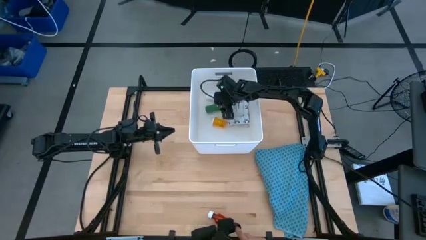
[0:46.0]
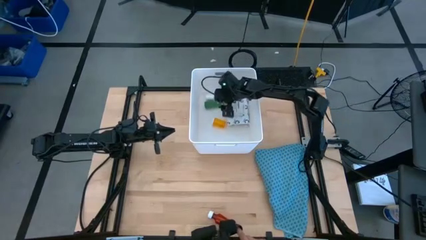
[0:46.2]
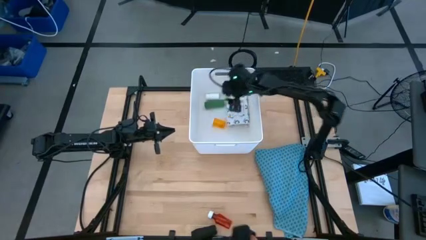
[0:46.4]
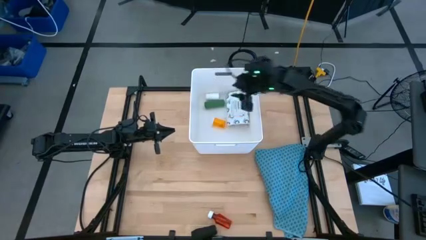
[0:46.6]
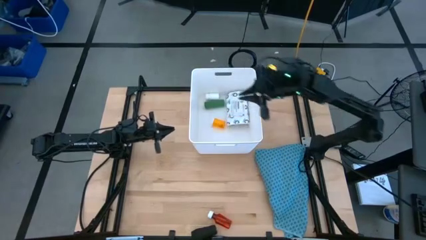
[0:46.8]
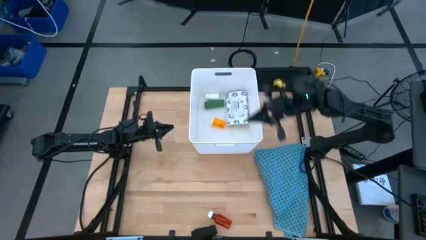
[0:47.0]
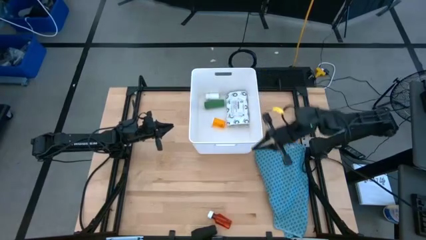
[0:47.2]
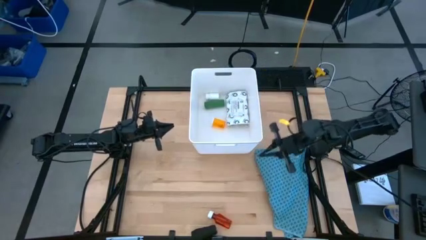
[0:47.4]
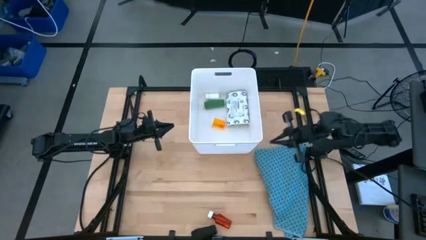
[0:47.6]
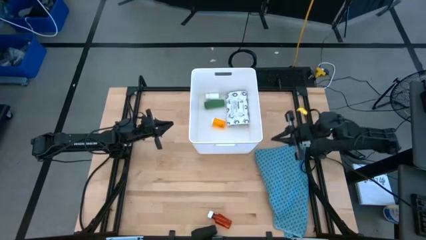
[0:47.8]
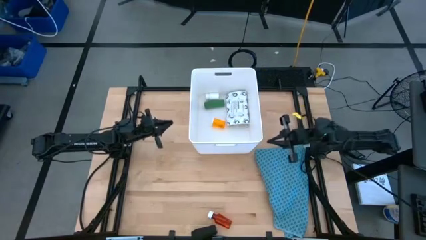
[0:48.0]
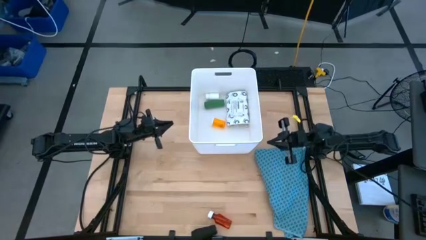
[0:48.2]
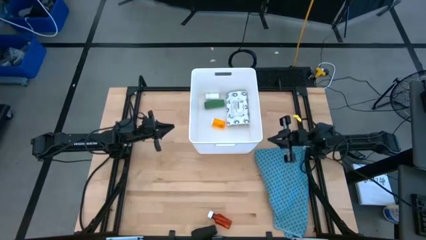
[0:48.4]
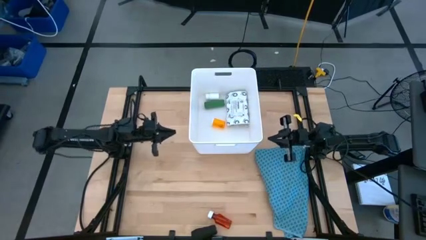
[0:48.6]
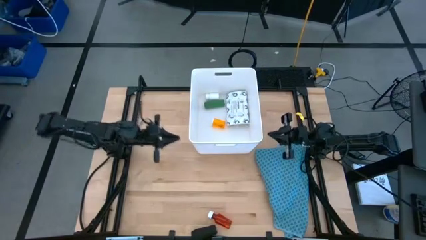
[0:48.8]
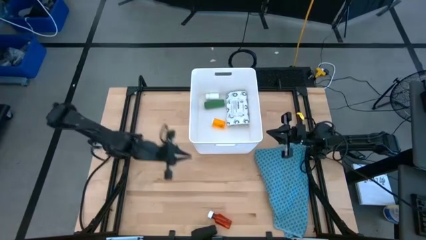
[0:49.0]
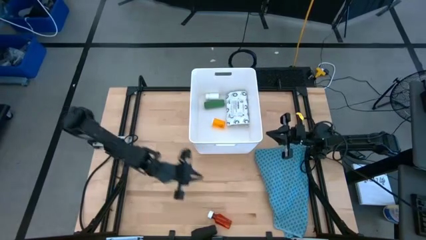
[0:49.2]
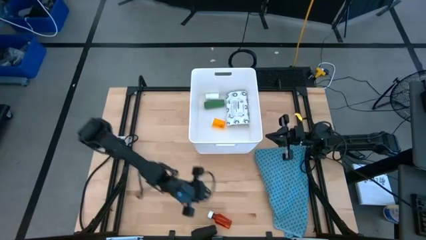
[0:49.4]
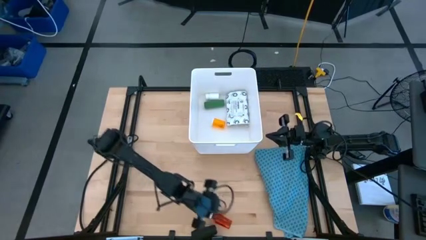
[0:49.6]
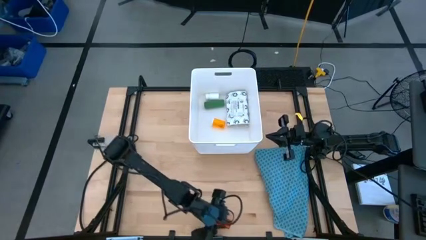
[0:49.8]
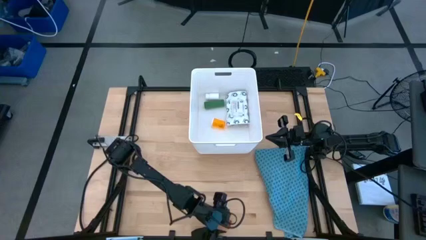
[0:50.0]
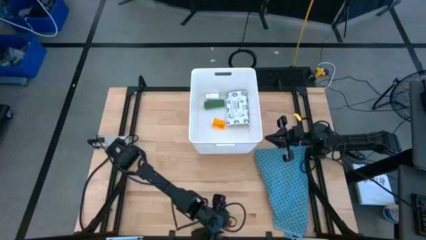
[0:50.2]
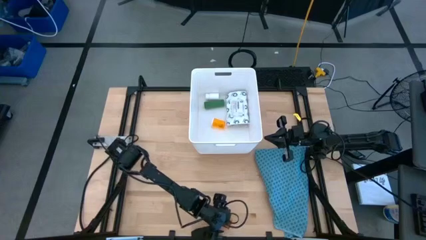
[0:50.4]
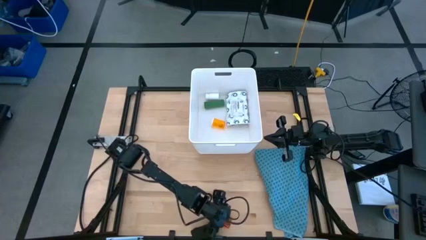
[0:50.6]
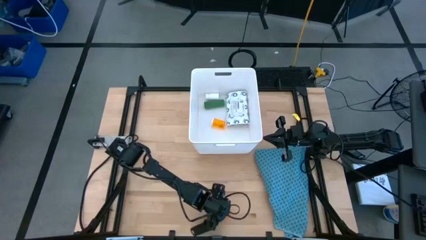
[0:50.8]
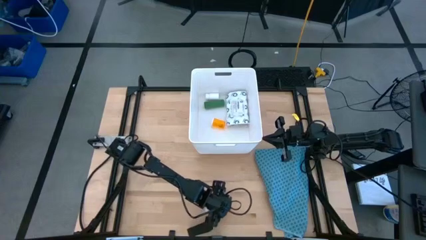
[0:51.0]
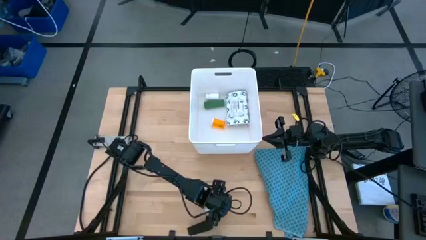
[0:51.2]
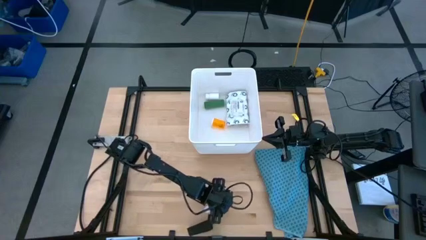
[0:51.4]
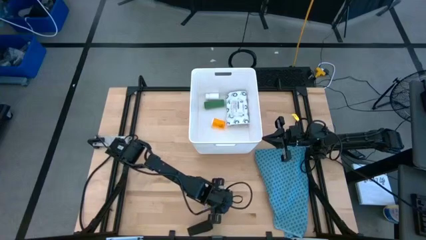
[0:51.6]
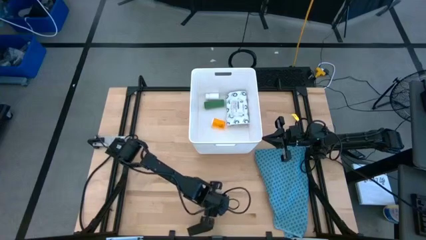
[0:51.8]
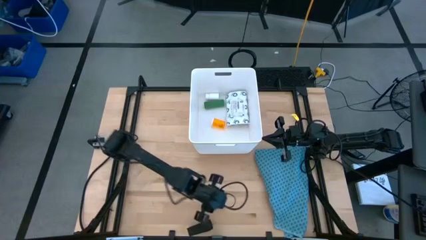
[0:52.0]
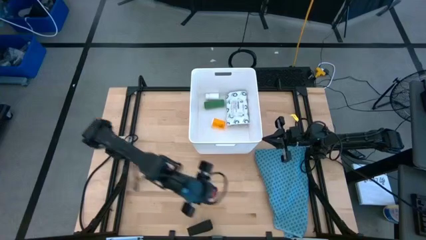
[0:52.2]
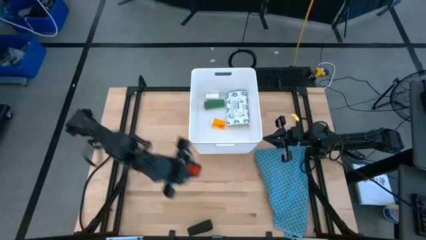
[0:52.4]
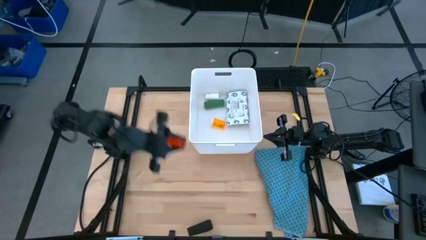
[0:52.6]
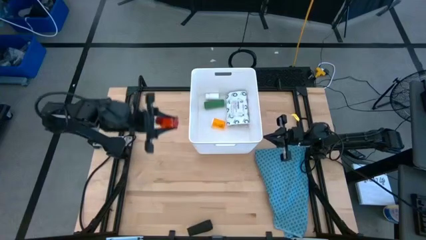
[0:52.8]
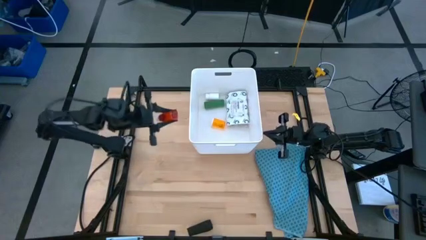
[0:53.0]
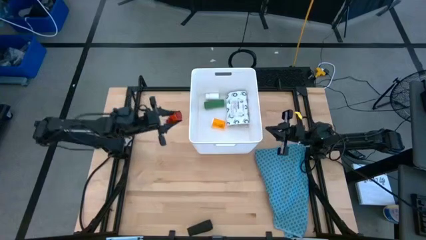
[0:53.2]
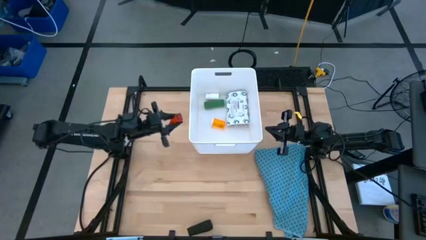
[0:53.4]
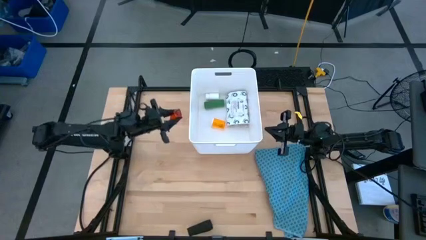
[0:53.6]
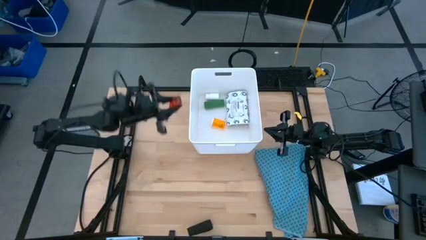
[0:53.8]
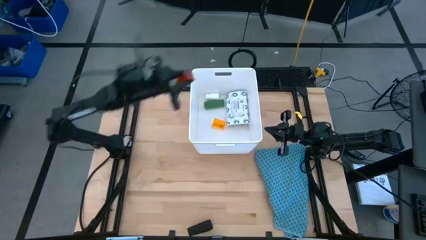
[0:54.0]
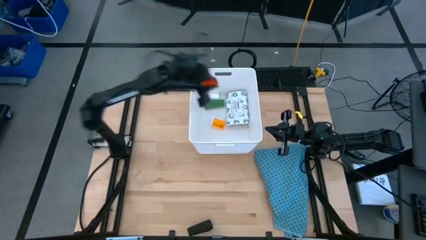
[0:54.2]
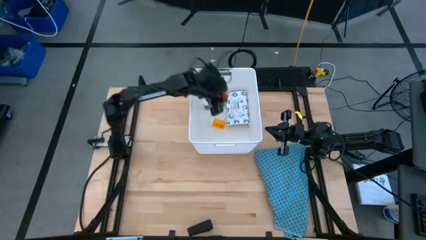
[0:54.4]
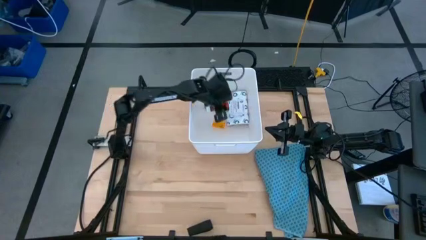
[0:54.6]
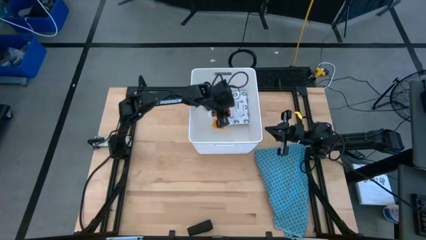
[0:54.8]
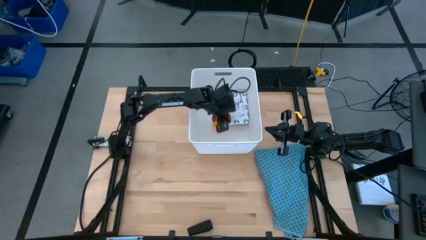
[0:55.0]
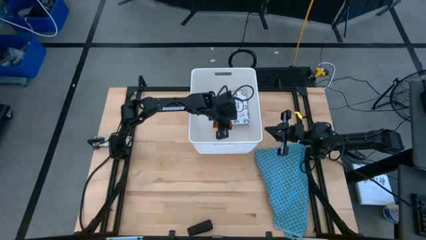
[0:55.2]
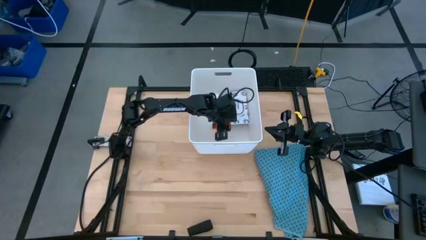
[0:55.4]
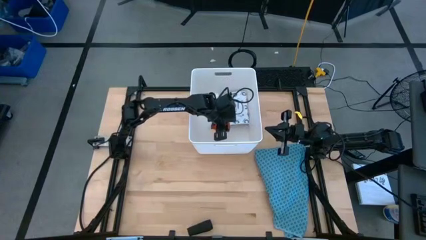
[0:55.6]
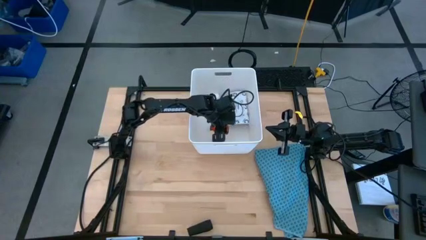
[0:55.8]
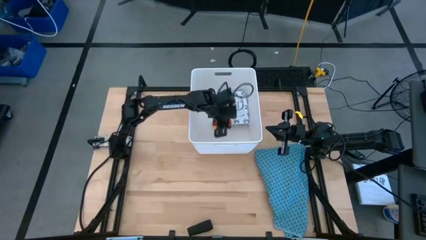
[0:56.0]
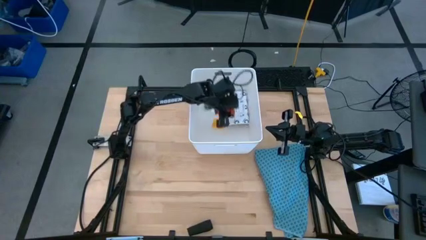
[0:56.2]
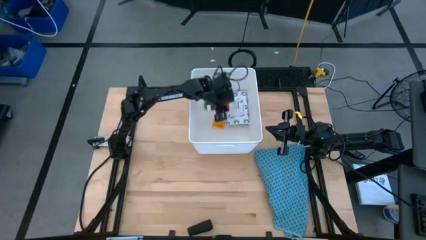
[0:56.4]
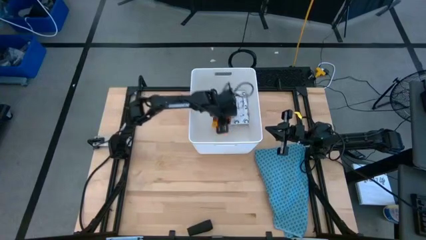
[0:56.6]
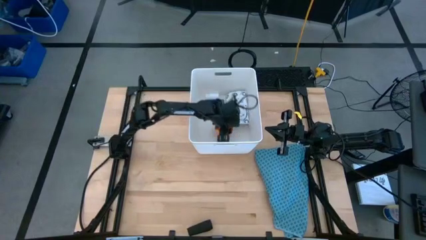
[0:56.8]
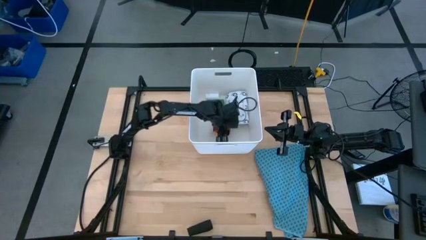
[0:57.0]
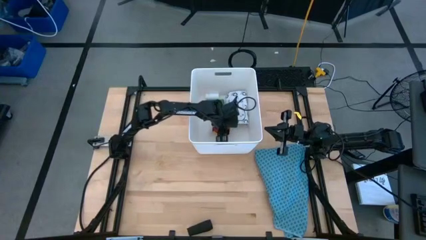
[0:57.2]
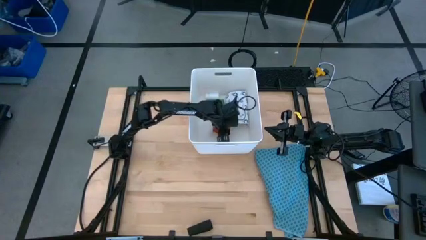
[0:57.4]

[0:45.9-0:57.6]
Task: Pick & place medical supplies in basket/bin
Put the red pill bottle into the white bin

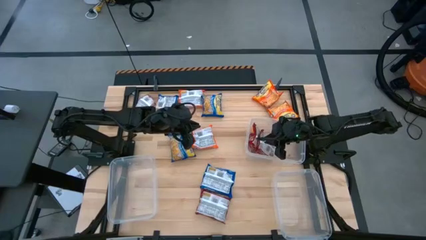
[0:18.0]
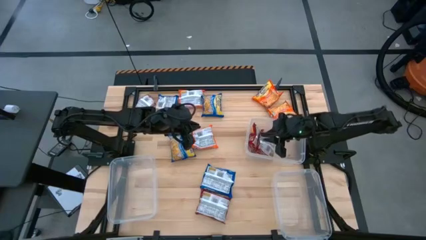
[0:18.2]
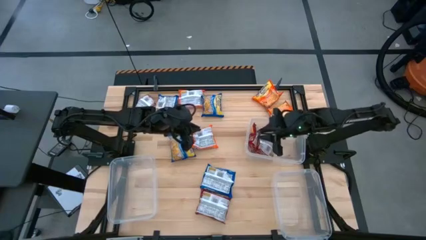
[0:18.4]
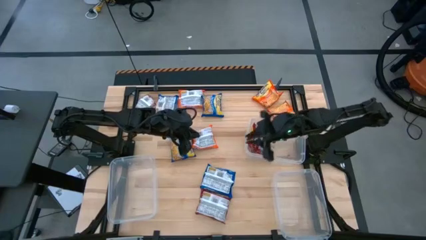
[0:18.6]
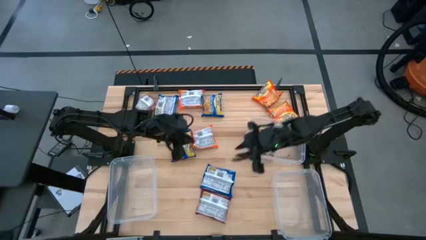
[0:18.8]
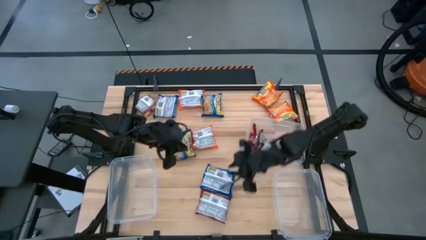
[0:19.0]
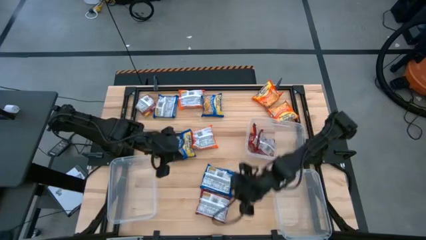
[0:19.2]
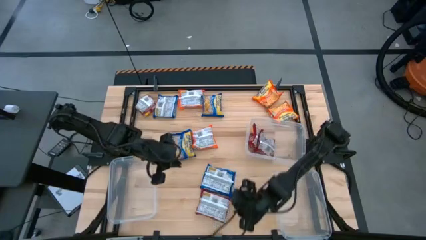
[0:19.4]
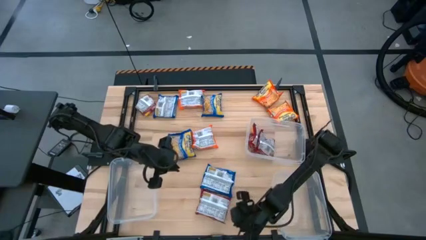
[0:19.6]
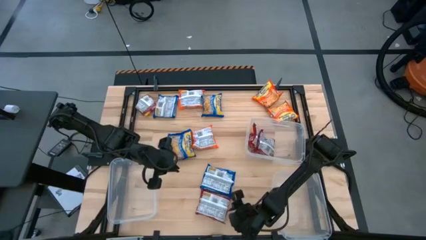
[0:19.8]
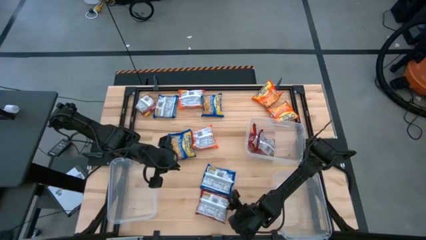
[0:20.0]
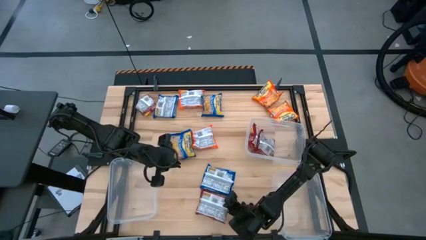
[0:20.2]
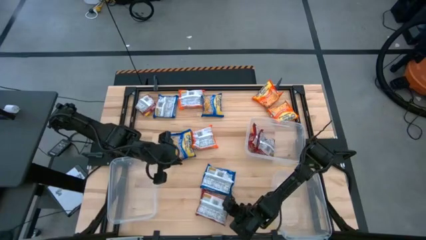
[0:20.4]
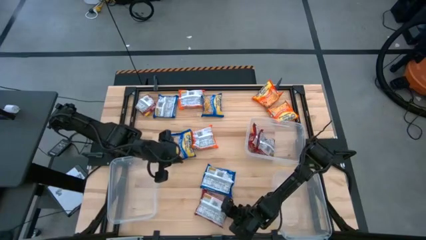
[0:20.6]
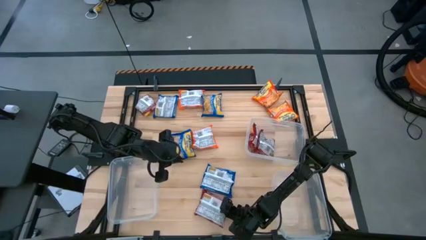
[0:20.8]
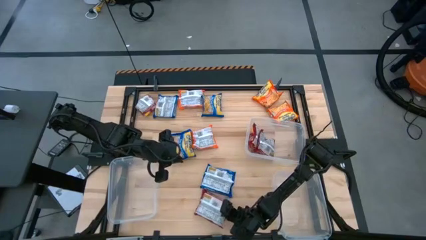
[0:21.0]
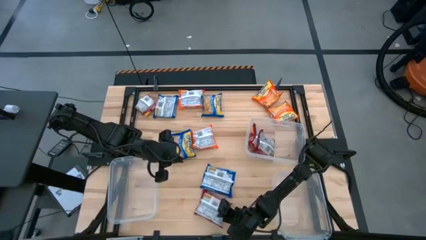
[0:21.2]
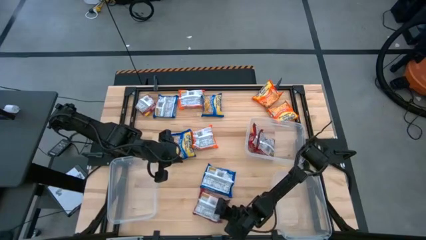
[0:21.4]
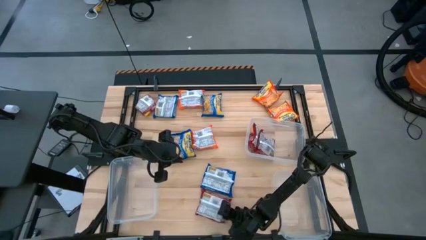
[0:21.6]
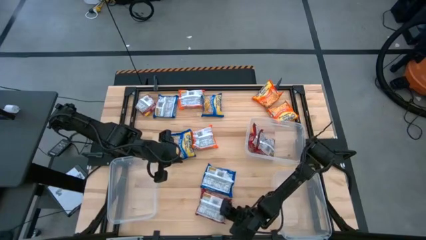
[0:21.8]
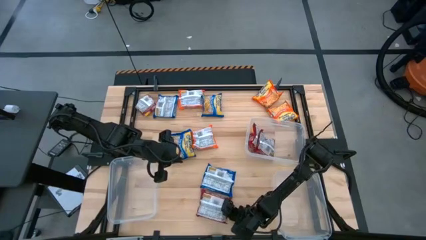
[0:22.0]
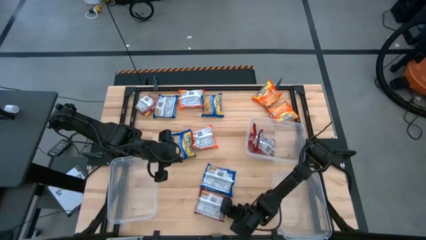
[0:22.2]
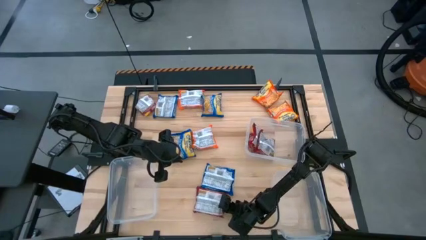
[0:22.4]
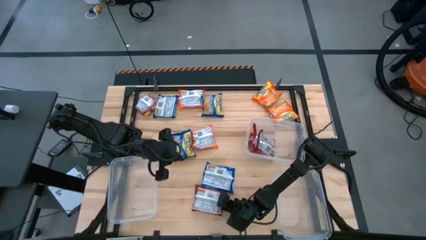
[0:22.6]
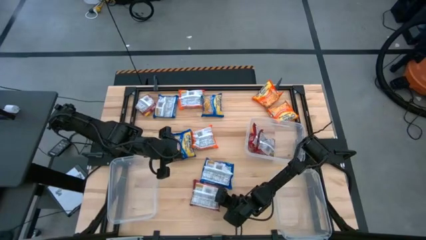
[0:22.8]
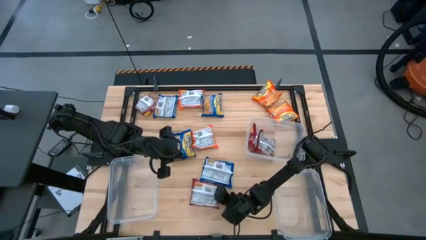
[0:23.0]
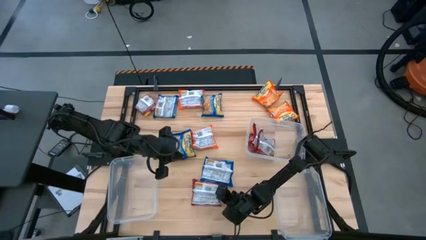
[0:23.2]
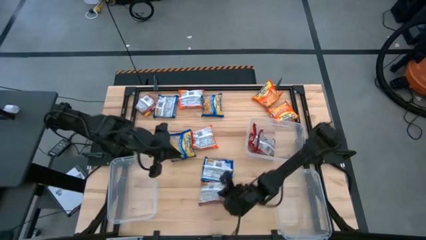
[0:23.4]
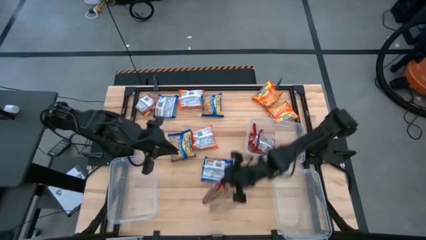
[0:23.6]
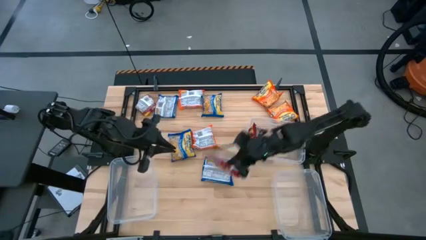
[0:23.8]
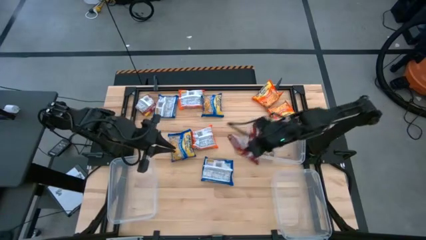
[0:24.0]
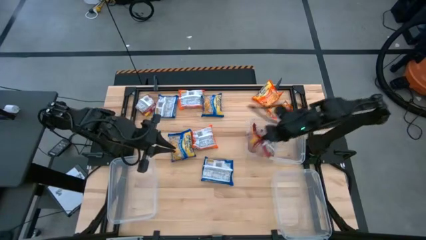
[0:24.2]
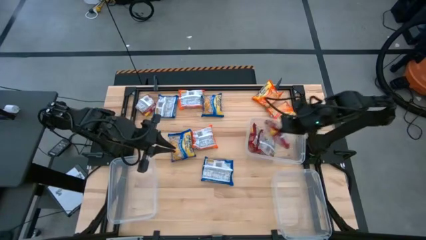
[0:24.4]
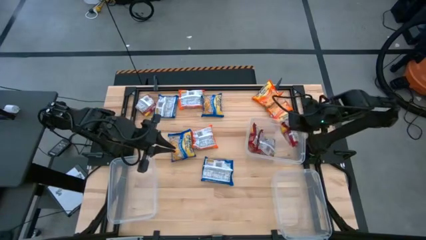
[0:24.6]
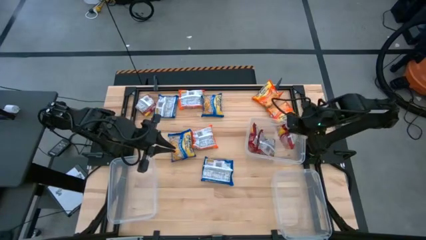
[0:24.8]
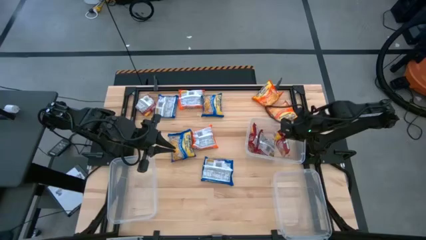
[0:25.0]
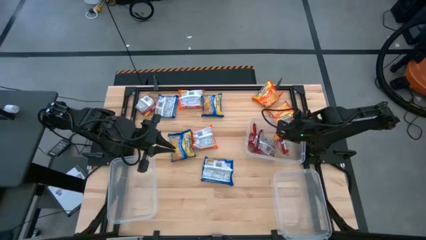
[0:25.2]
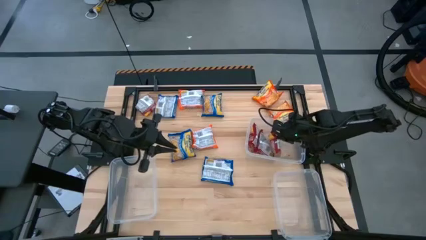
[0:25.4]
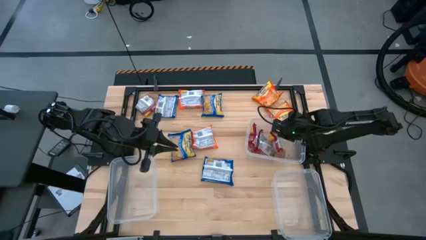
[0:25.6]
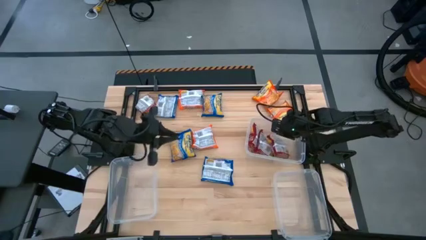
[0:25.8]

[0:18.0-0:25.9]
Task: Sort Maruchan noodles
Put the red noodle pack into the top right container
